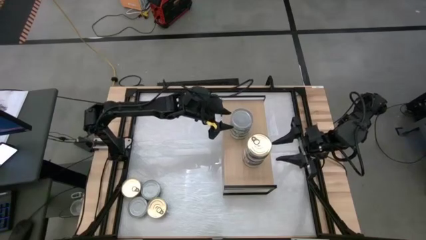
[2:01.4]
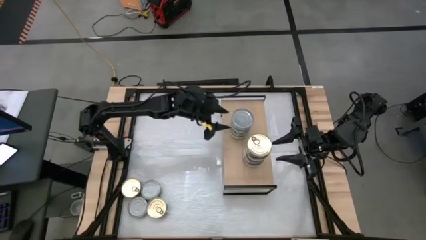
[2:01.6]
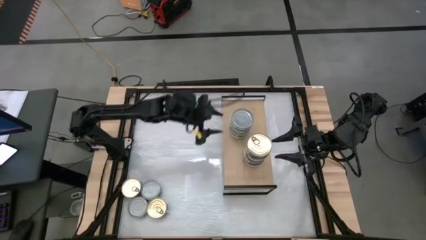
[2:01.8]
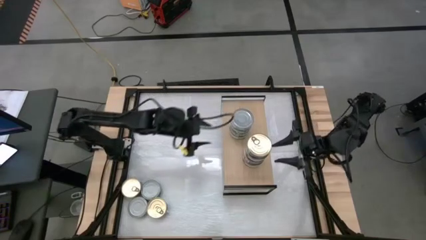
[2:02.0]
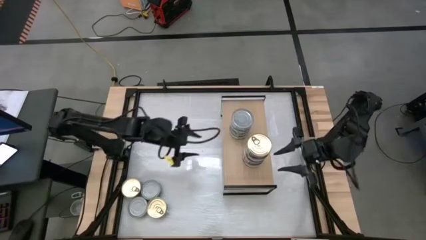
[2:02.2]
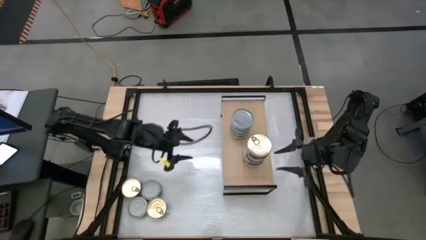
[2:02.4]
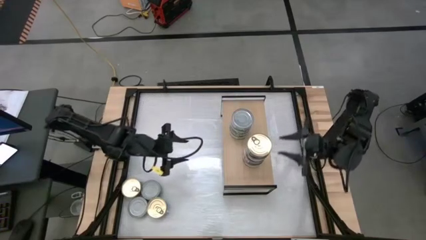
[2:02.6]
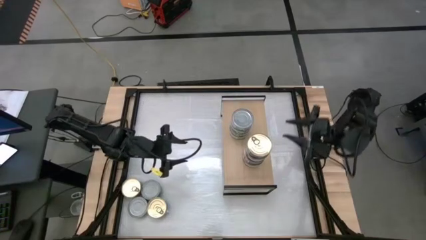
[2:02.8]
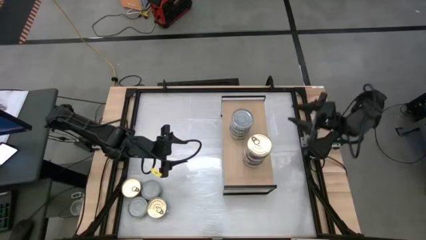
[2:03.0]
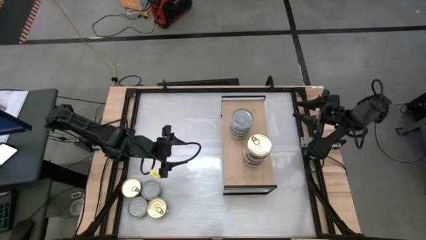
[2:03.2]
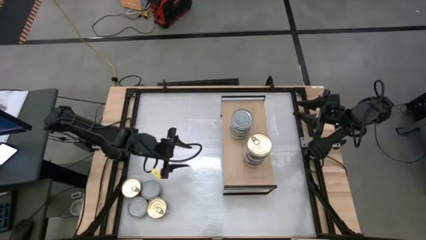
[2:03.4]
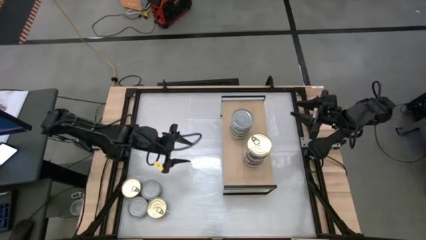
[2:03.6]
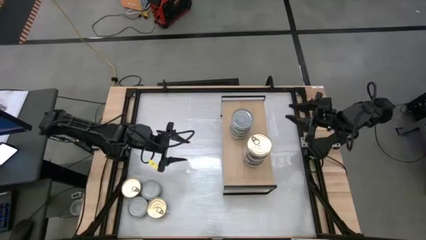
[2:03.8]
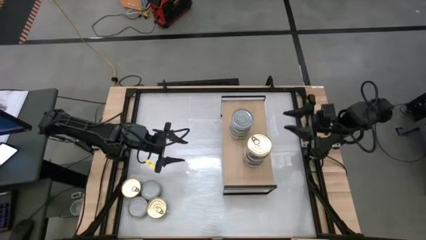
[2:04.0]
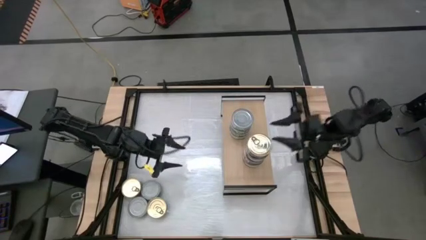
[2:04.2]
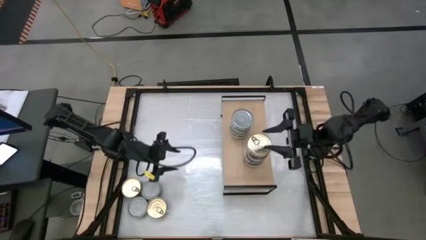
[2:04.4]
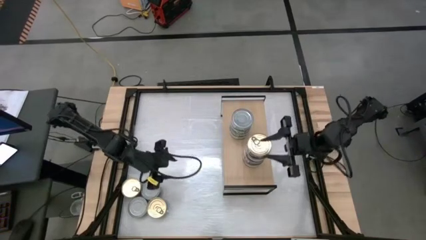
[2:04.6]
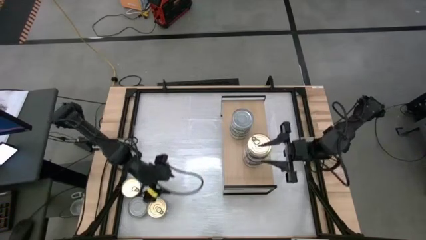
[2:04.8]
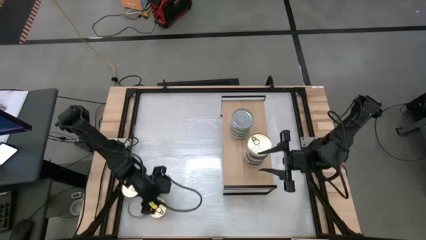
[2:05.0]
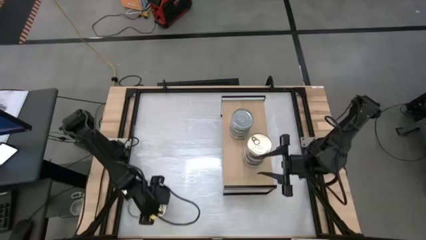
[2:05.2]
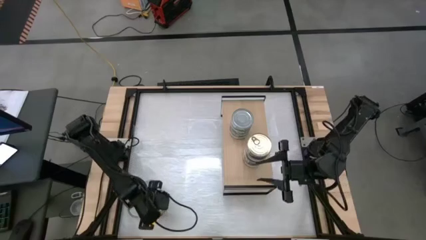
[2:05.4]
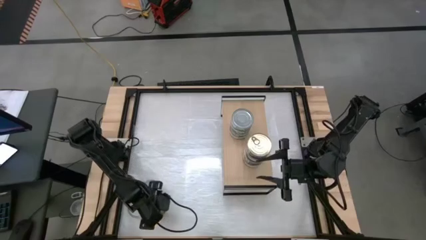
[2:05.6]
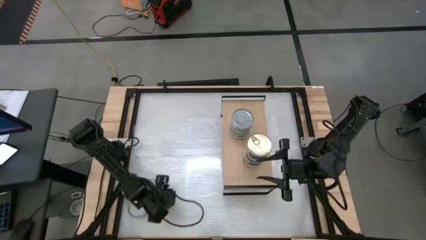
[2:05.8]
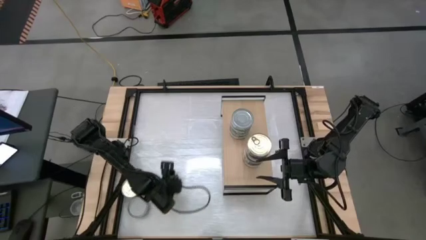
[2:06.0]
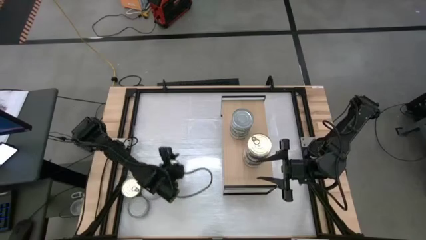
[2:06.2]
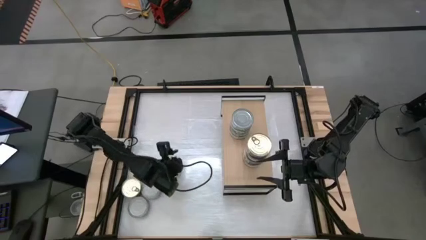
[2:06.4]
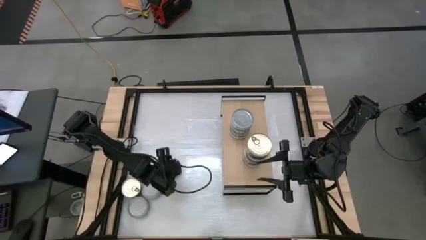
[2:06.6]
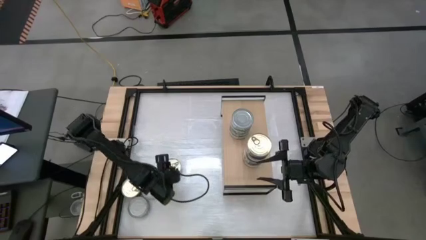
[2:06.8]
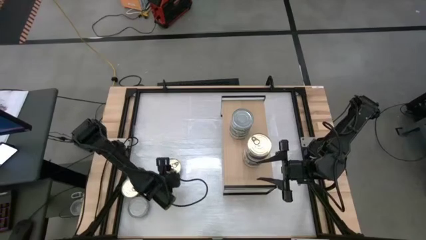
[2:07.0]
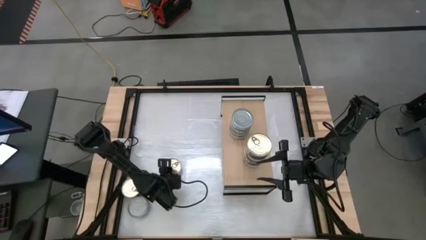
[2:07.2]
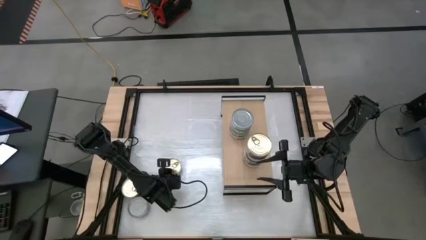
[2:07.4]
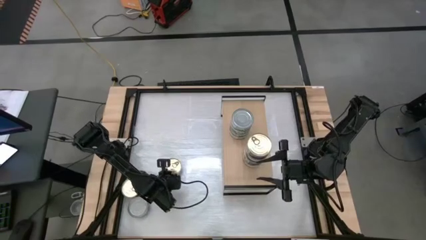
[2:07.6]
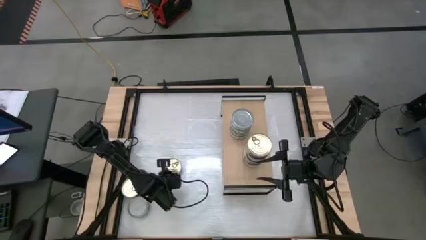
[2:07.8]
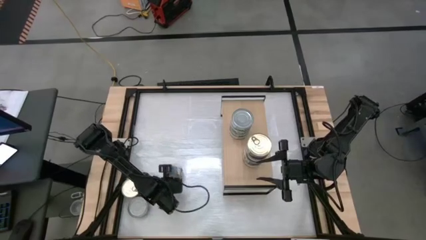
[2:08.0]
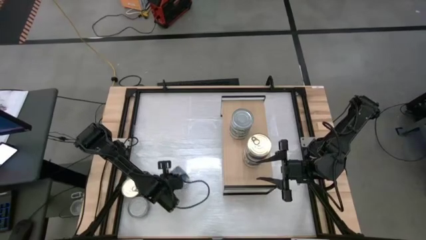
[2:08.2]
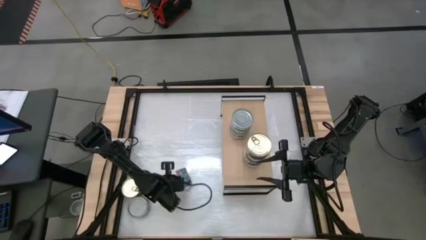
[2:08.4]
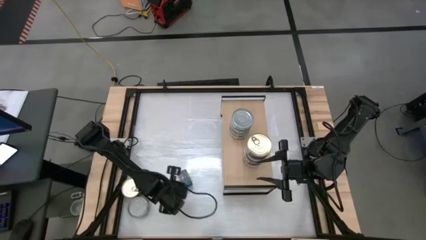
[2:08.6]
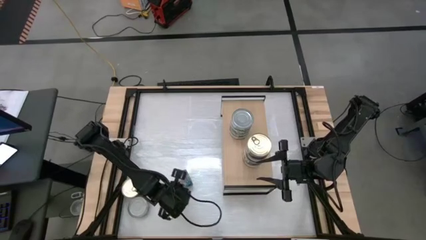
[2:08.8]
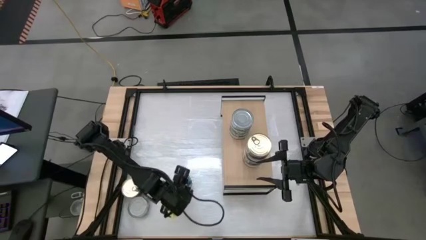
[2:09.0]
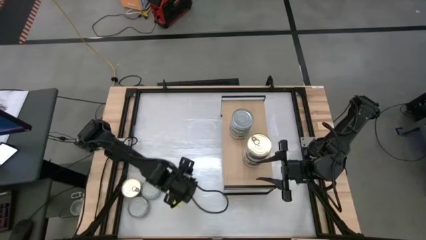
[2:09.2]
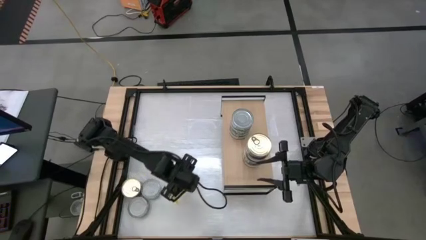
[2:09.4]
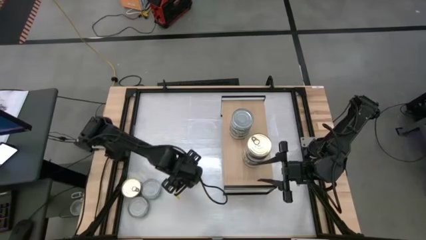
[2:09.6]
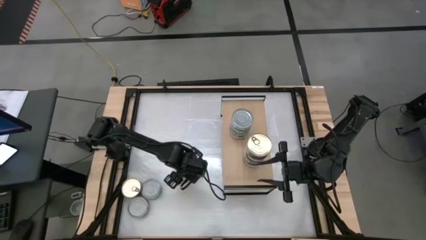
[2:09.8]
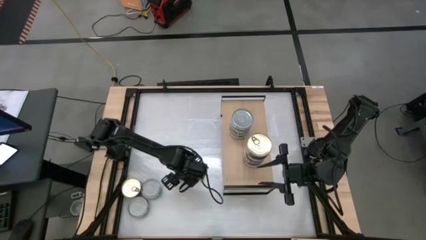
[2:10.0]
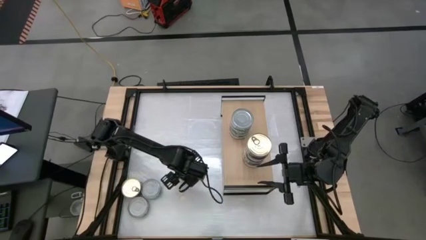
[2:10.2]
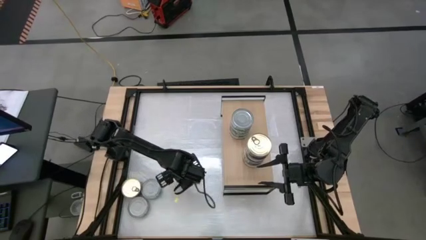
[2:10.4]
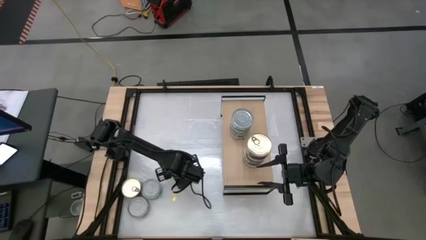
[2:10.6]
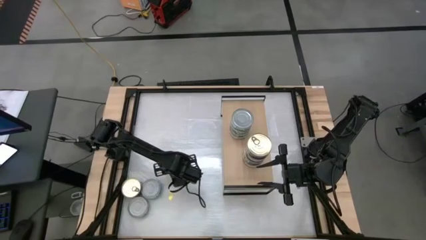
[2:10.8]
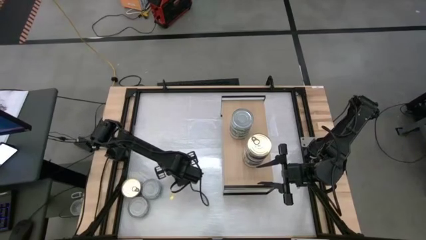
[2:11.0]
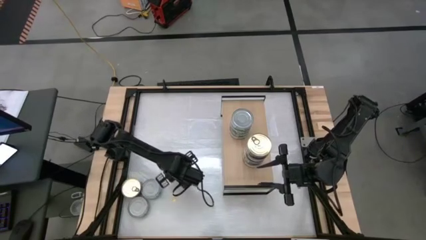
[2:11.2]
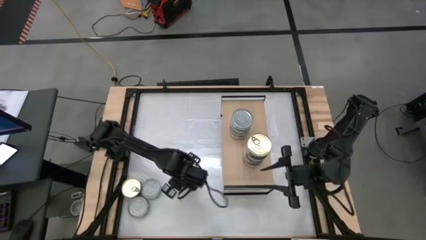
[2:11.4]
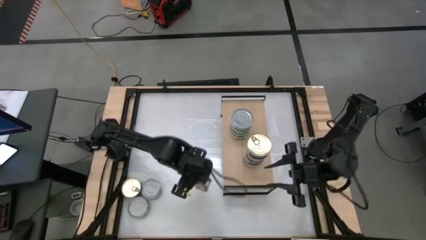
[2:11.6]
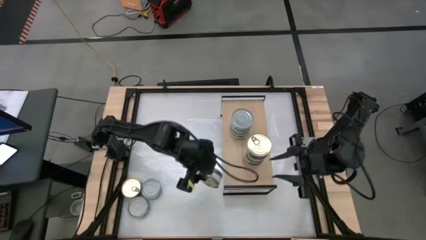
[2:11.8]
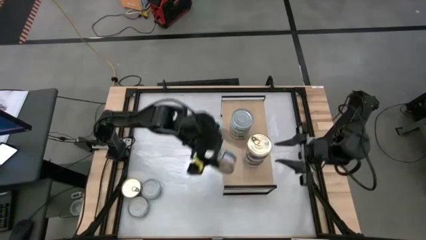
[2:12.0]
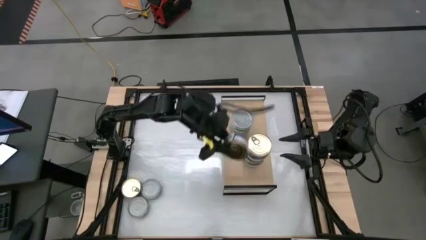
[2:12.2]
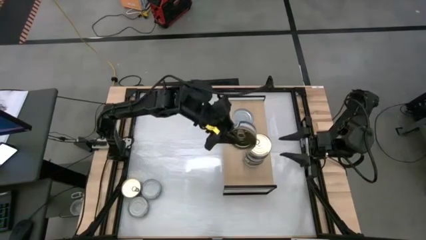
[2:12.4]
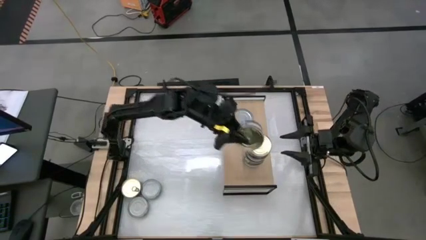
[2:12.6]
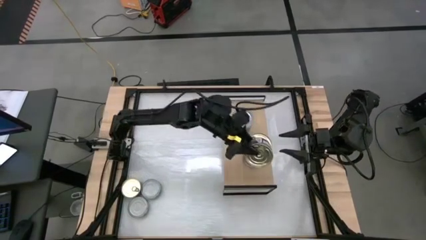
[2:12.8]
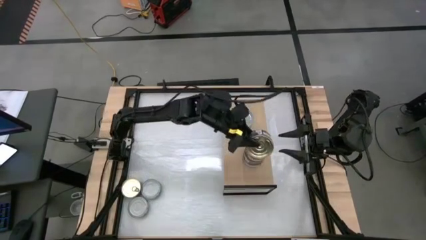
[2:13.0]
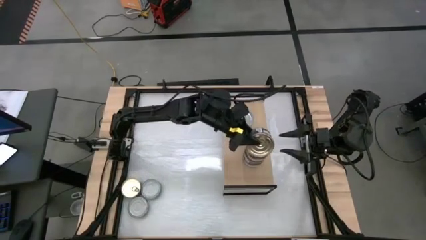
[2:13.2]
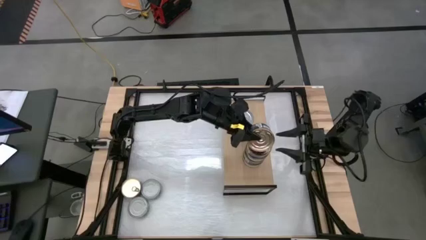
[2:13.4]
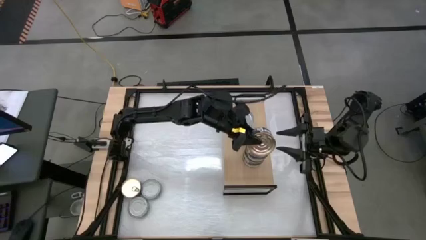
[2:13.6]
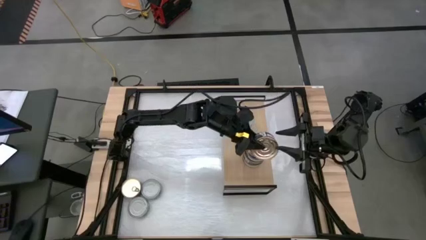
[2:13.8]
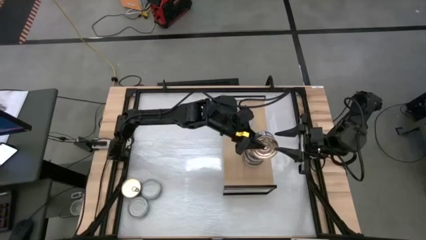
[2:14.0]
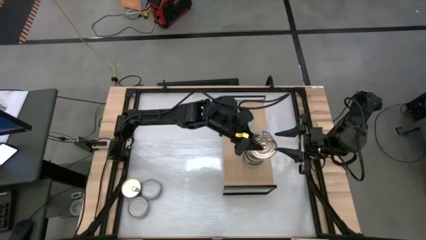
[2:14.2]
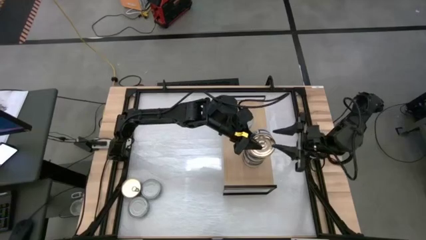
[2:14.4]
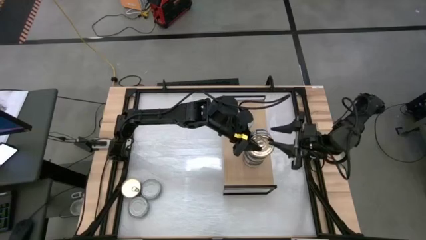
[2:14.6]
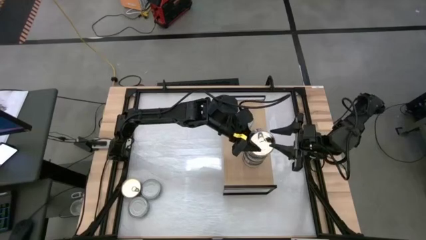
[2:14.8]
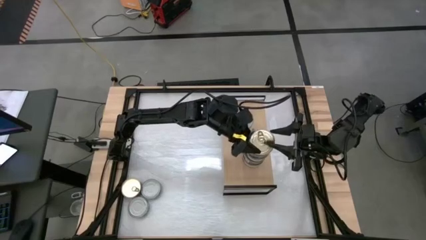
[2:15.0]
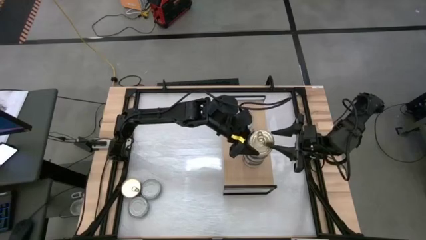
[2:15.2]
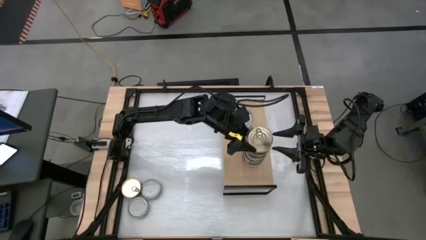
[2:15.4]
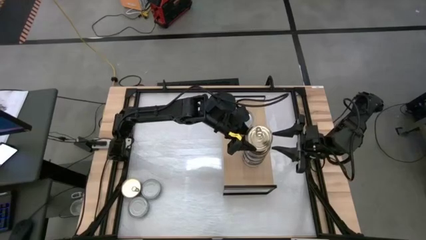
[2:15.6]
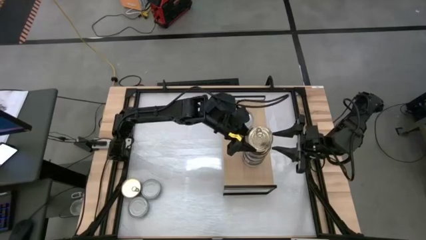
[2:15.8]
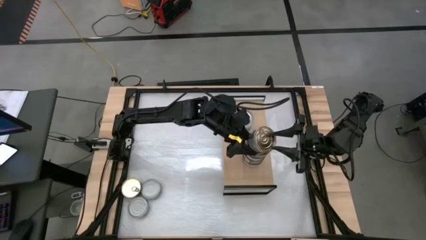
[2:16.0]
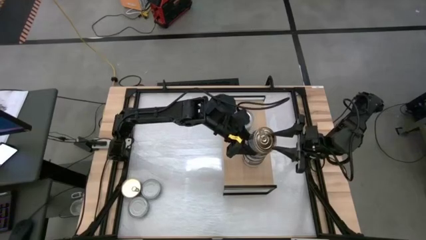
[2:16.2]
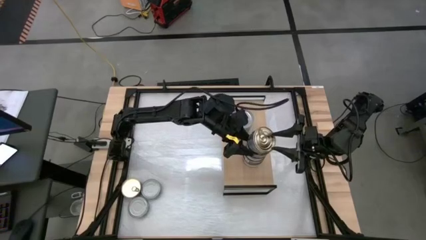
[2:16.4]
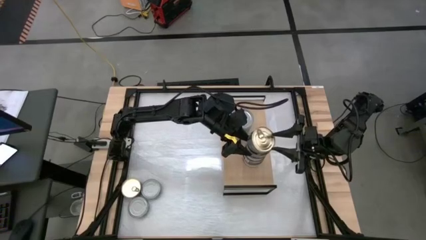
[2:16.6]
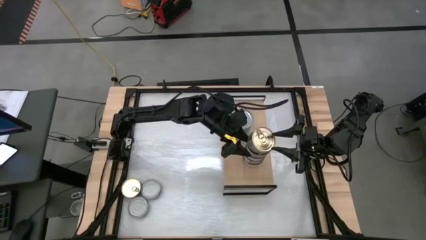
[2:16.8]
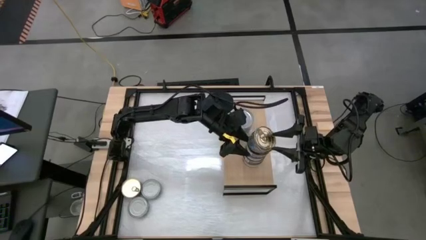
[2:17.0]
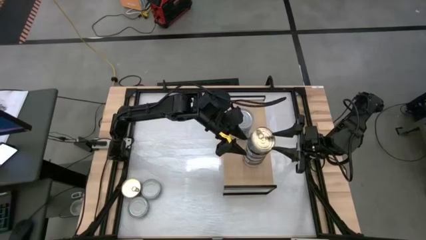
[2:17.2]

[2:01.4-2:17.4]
Task: Stack canned seafood by type on shelf
Stack the blue tuna can on top of the blue tuna can
